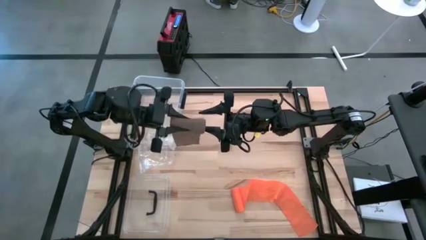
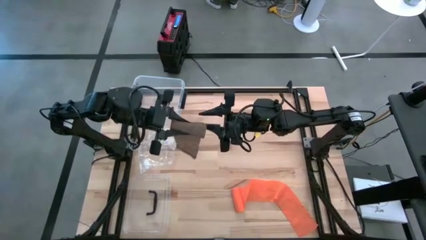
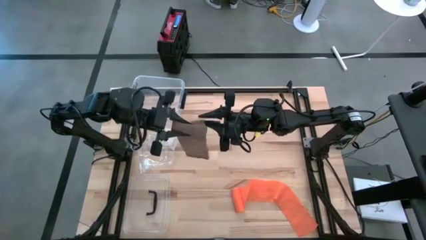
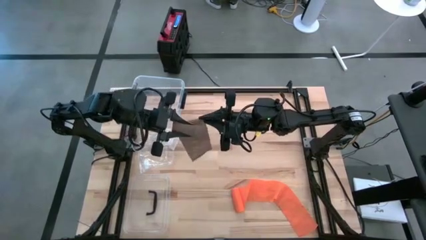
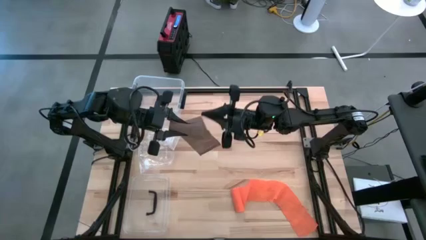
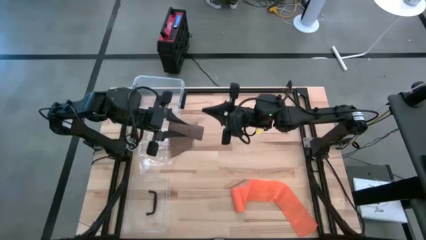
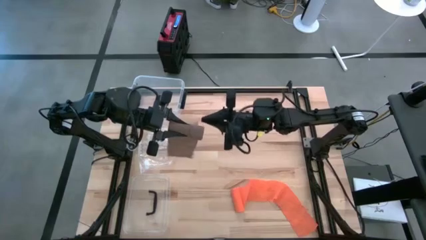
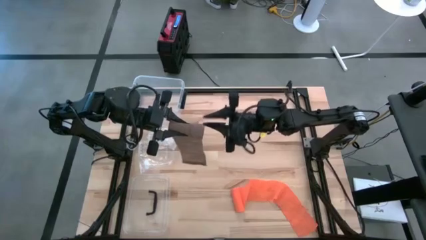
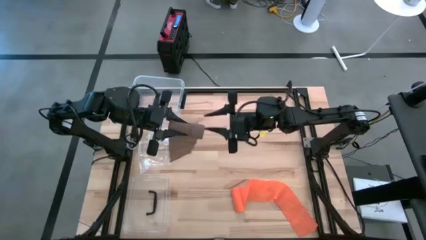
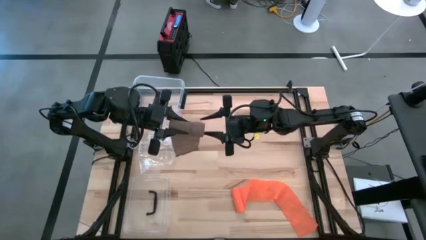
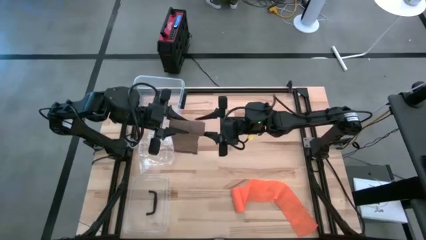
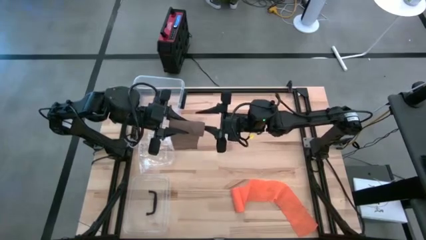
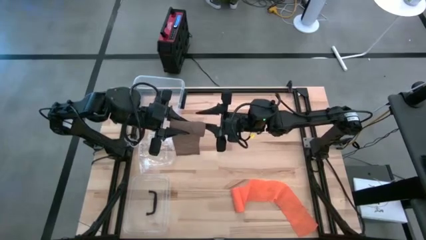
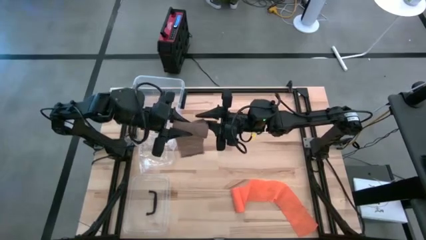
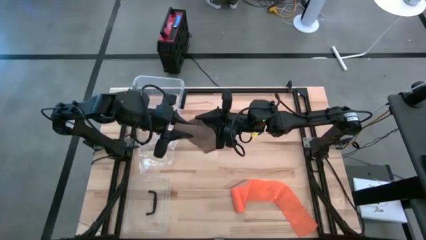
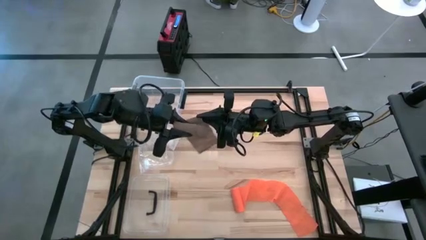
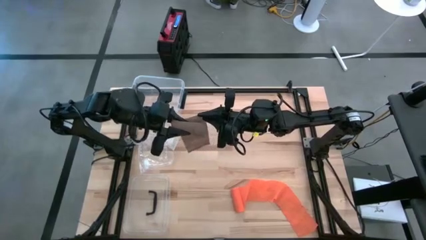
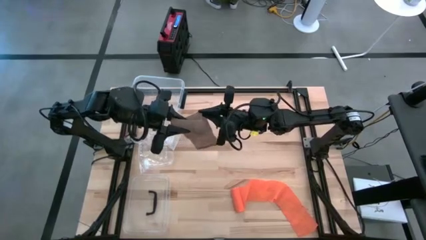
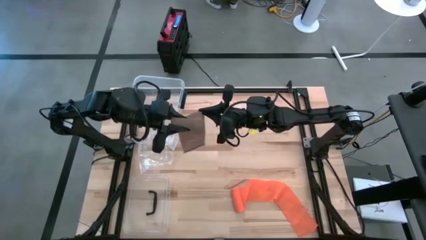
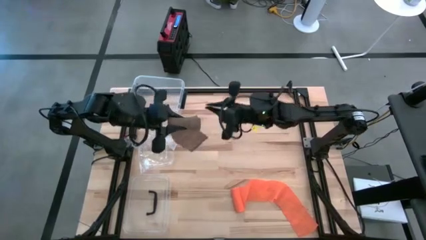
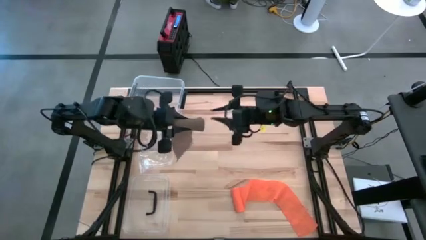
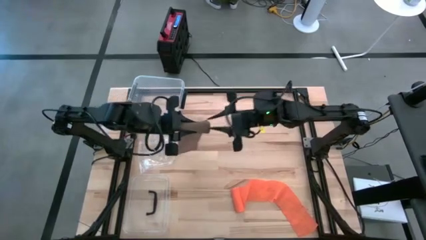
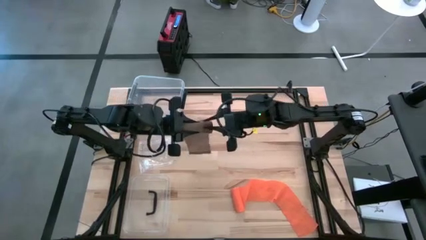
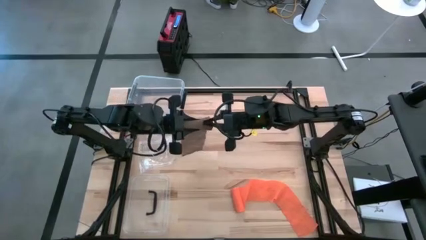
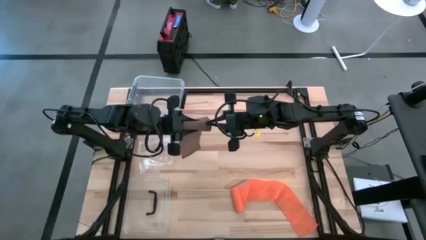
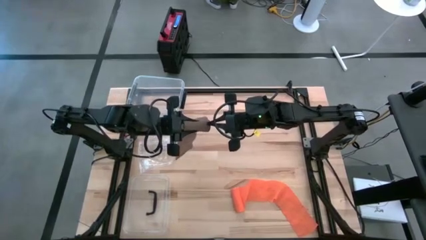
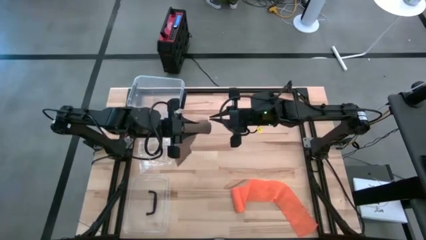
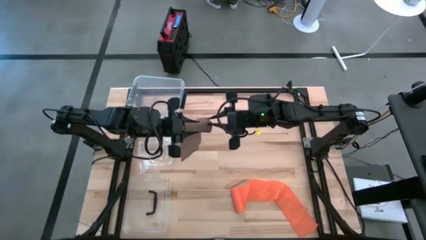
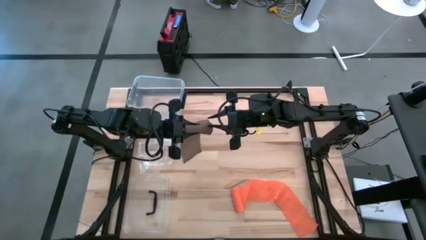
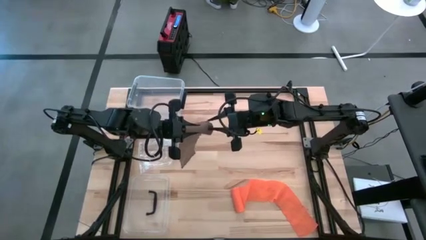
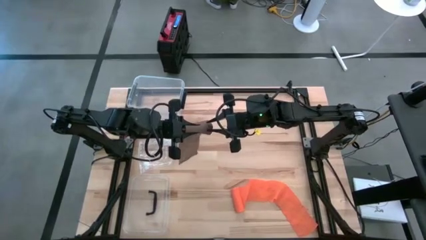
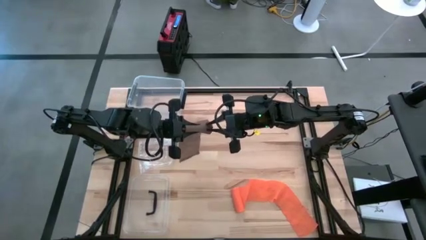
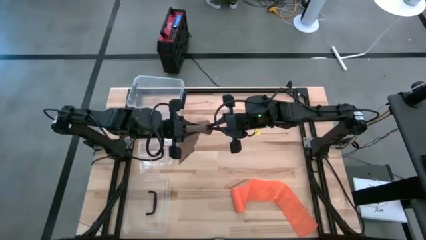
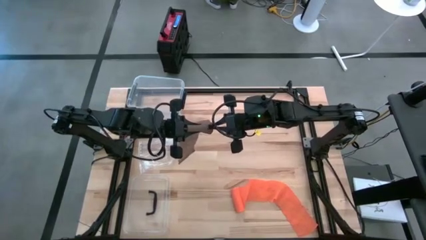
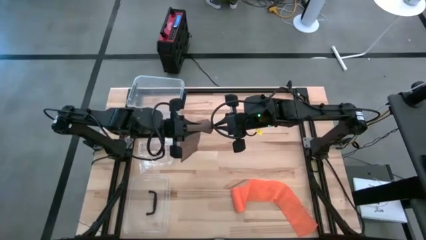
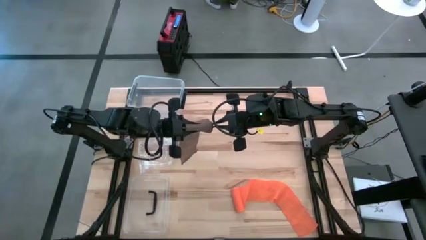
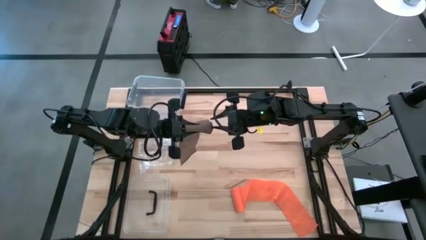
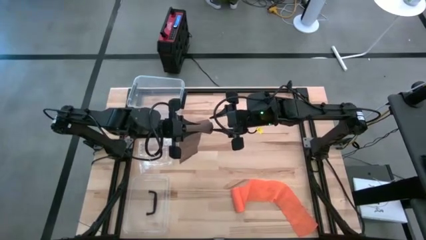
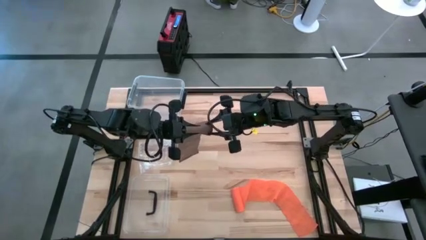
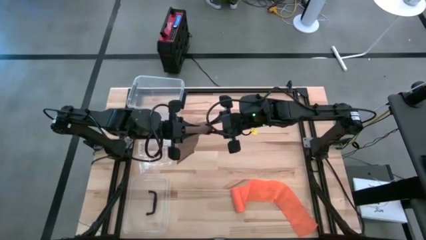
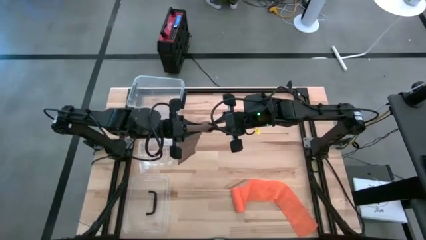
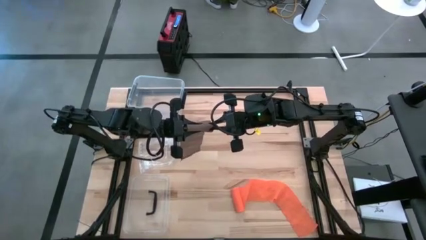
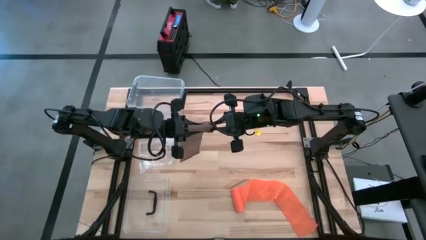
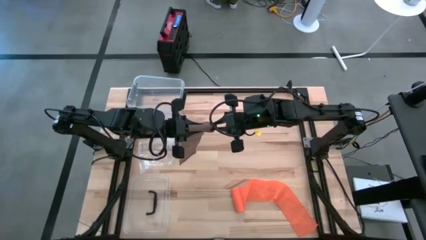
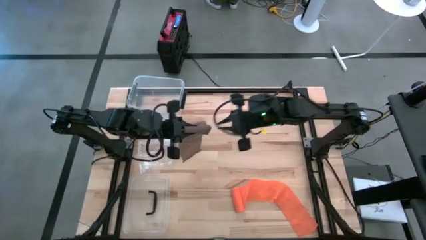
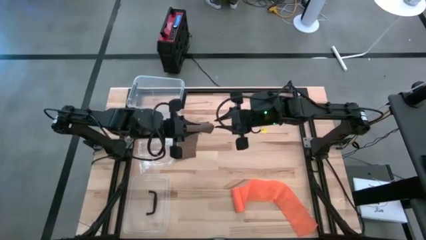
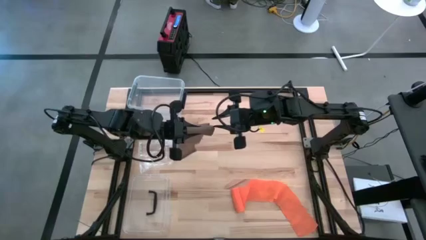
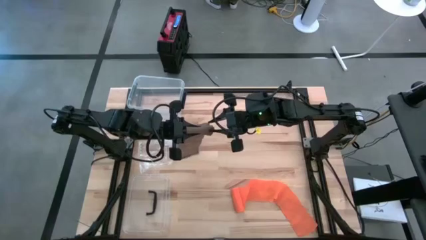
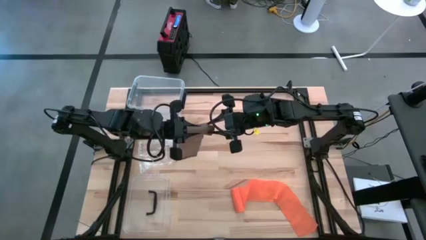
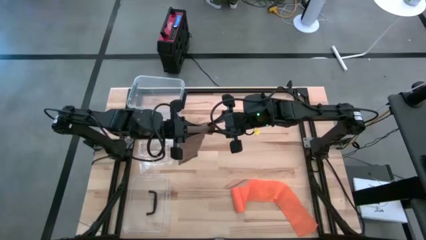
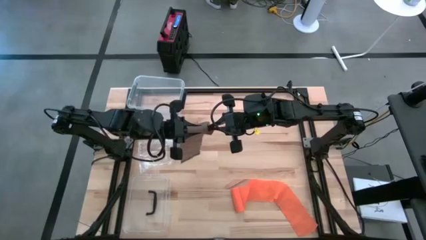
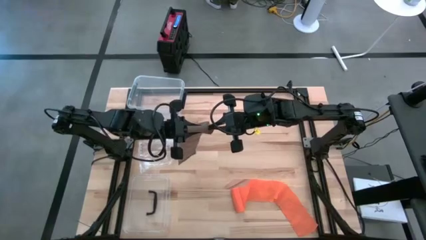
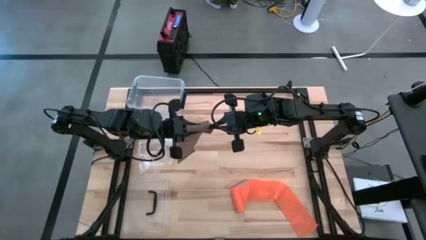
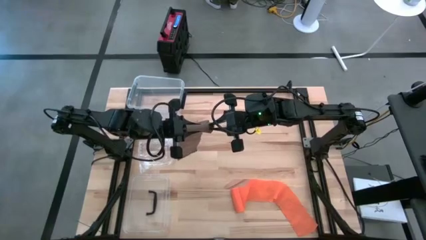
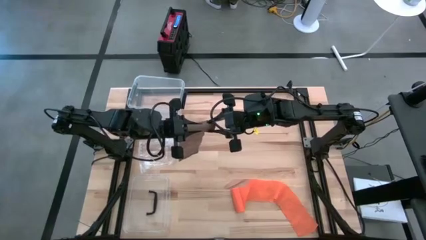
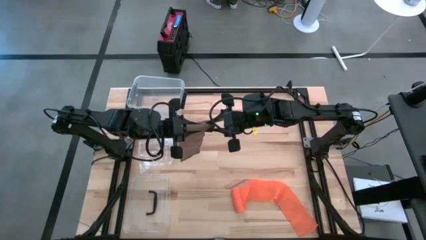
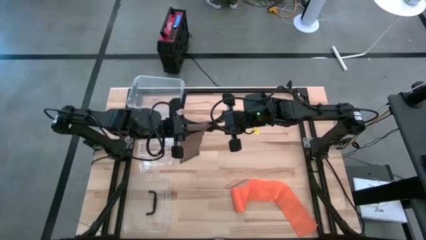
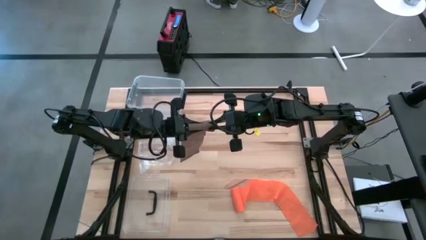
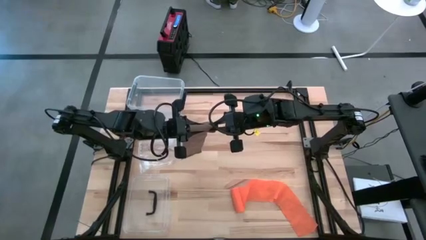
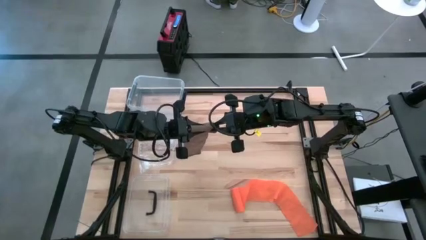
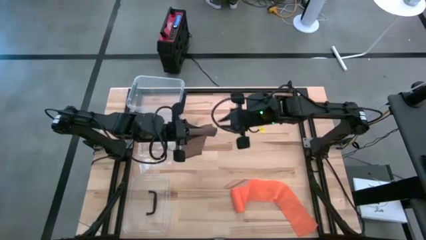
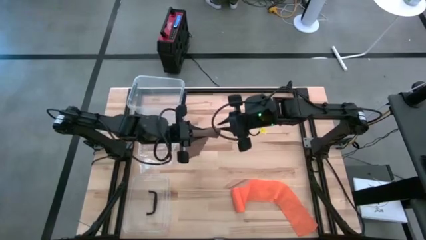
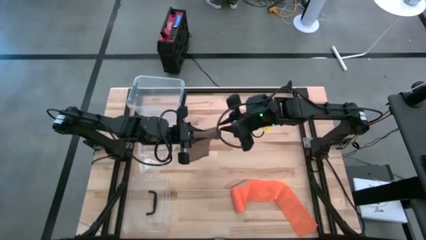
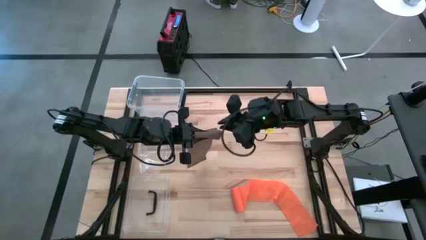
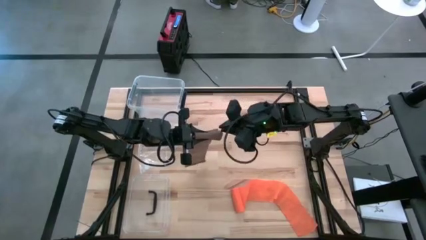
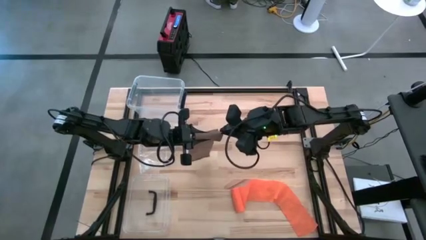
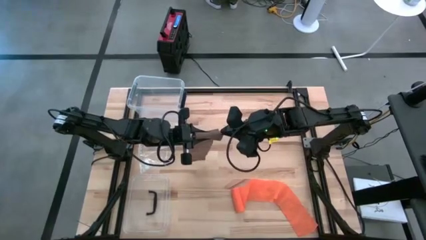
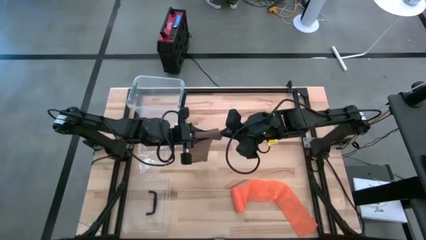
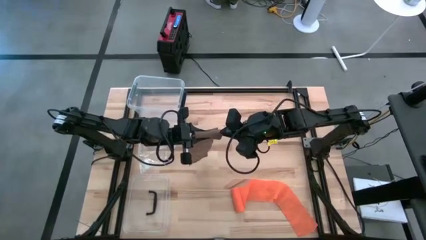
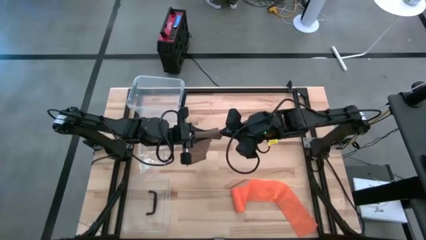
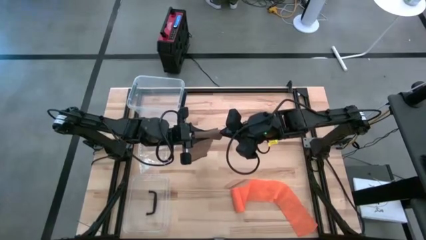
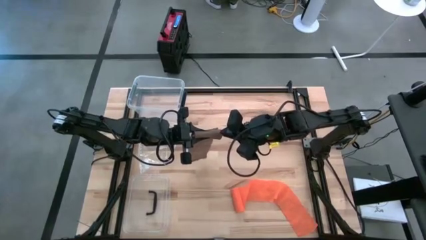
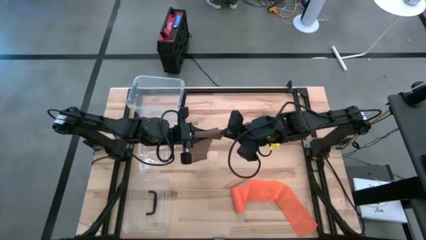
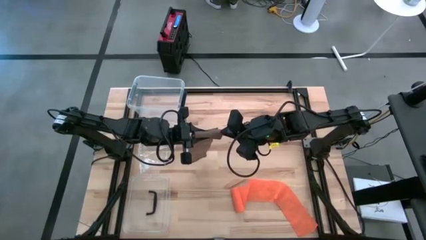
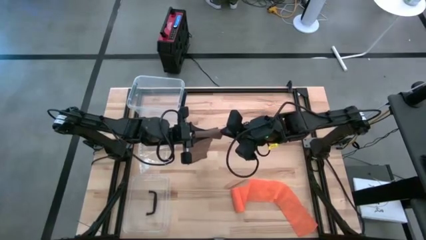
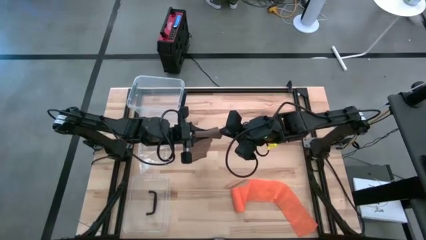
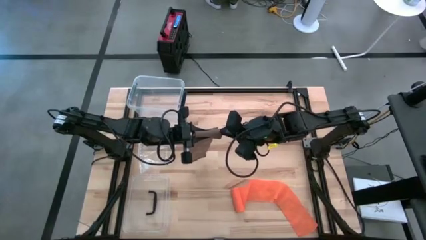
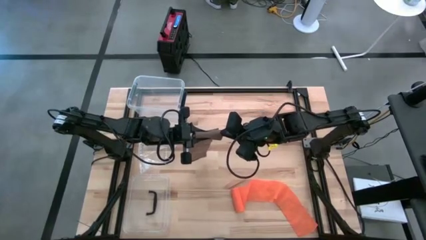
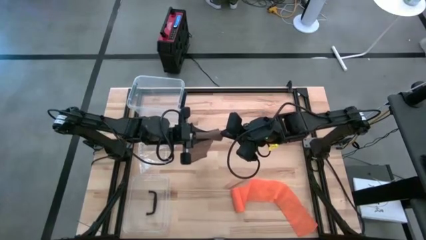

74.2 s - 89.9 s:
Task: Roll bandage
Roll the brown bandage

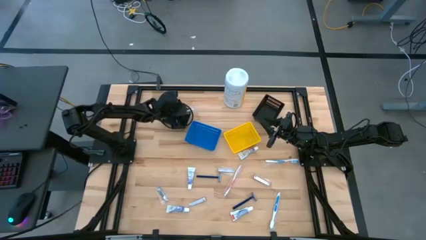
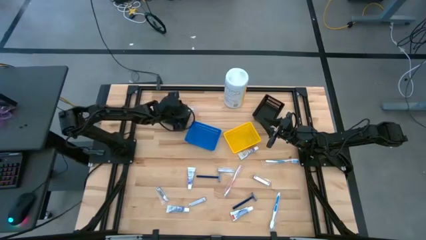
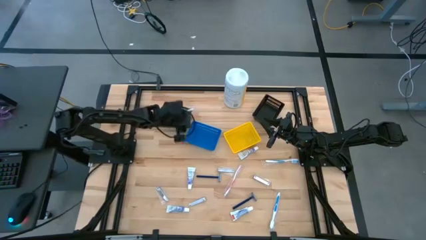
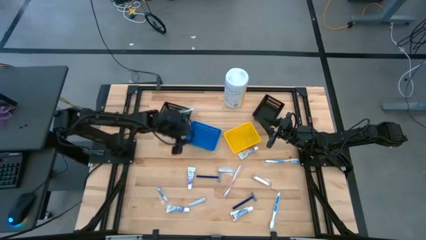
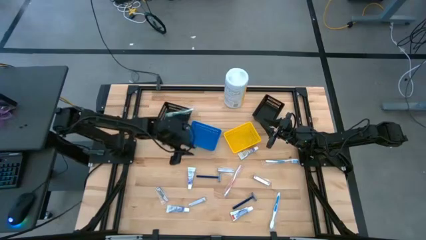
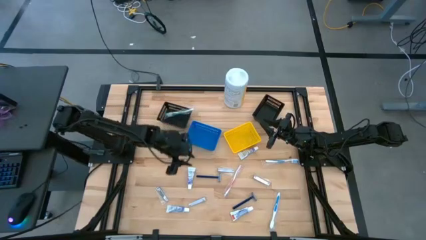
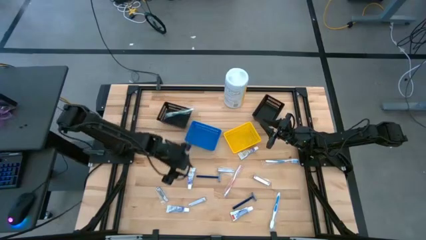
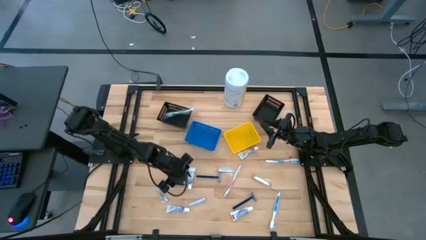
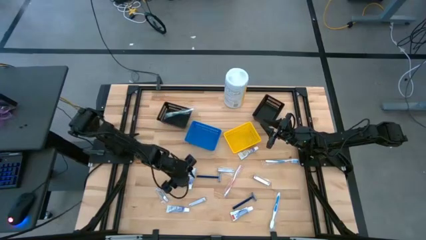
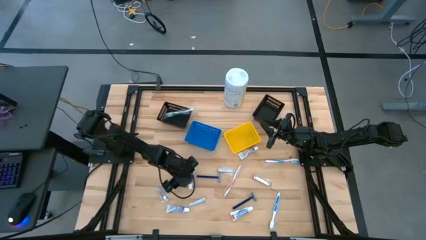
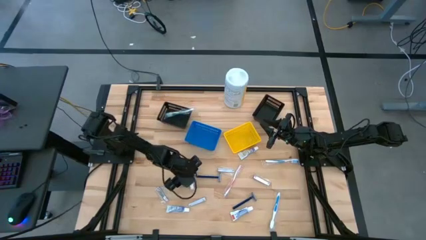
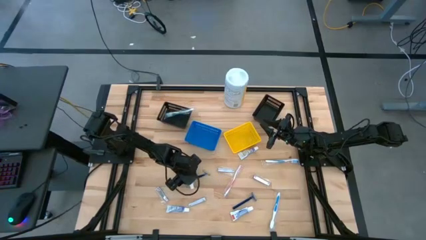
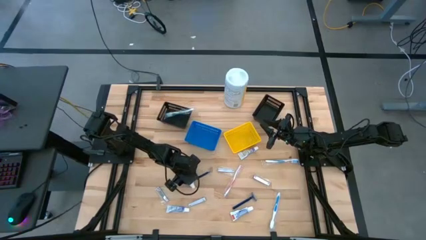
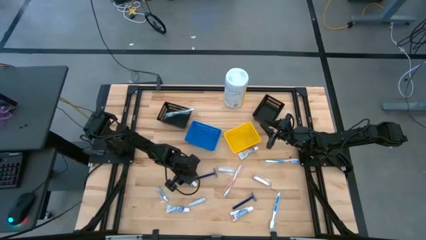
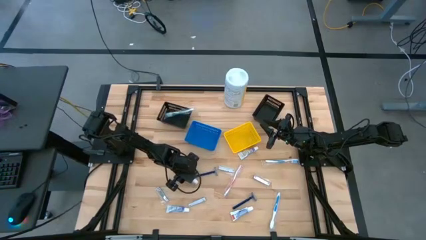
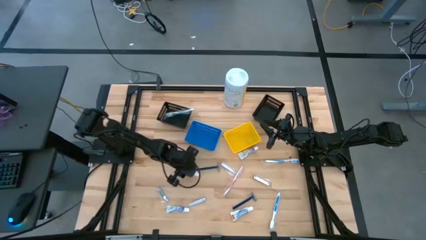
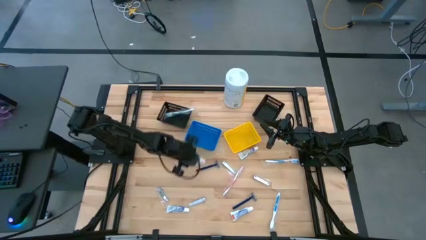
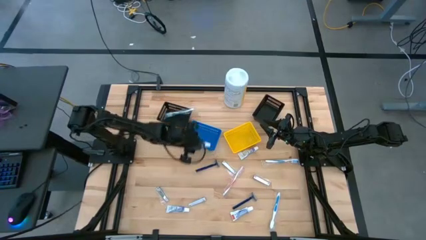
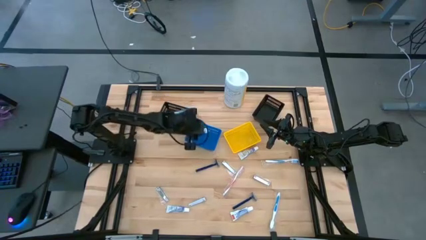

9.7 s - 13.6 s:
Task: Pick & Place Travel size toiletries
Put the white toothpaste into the blue bin
